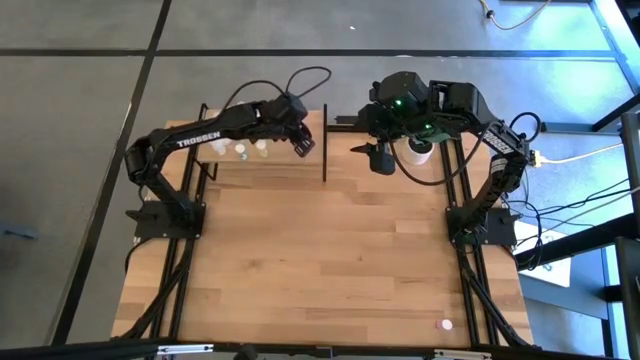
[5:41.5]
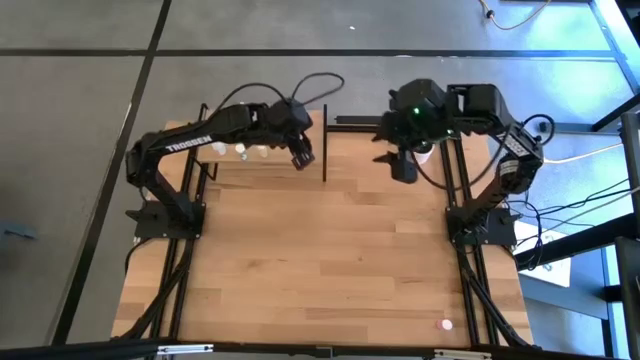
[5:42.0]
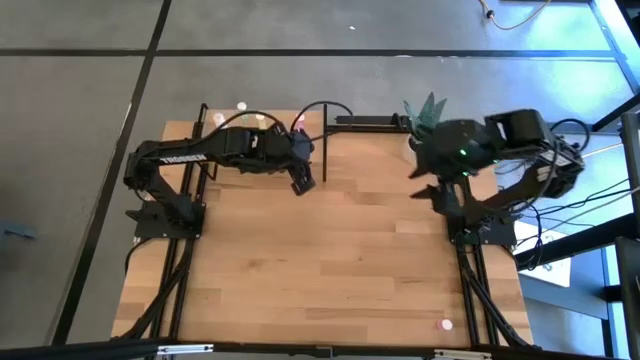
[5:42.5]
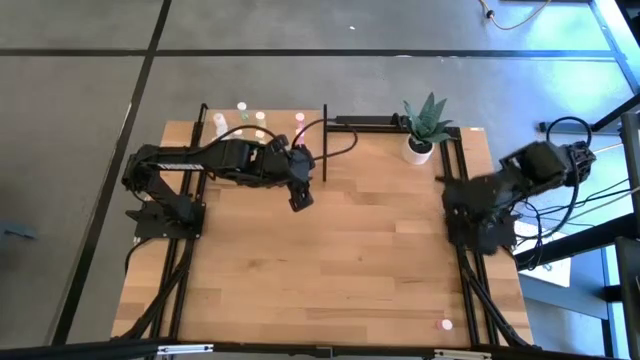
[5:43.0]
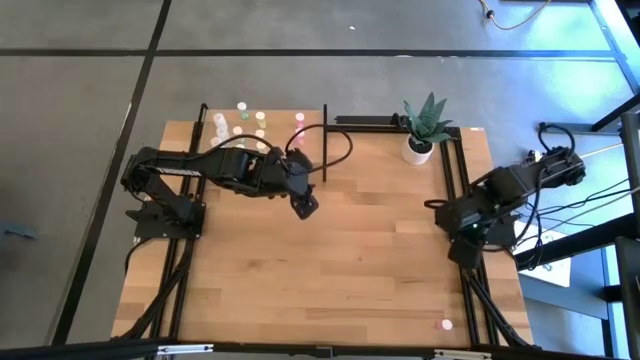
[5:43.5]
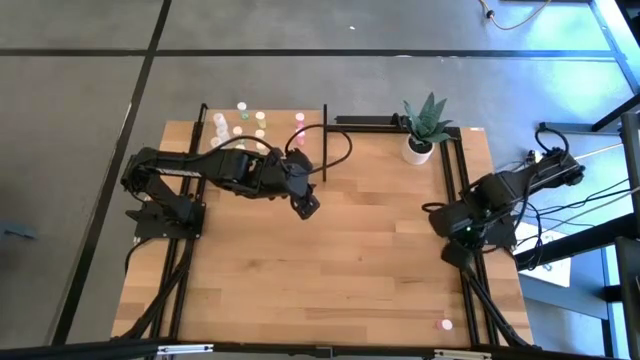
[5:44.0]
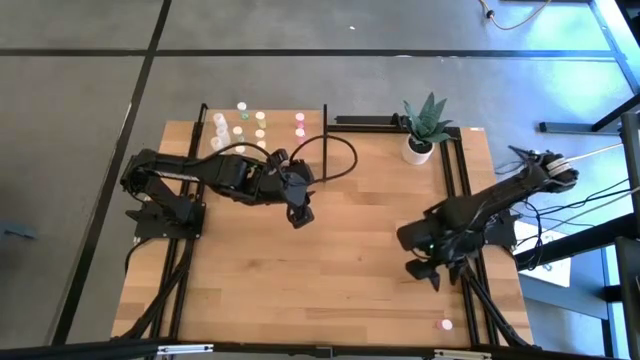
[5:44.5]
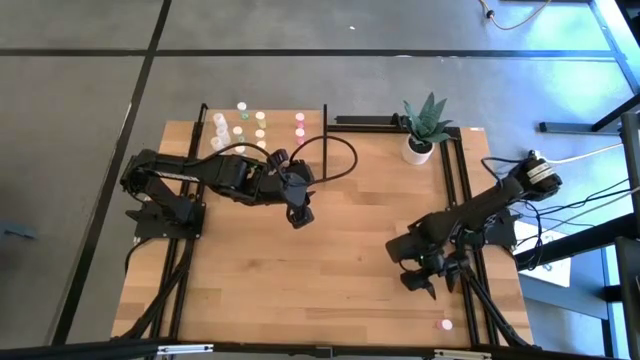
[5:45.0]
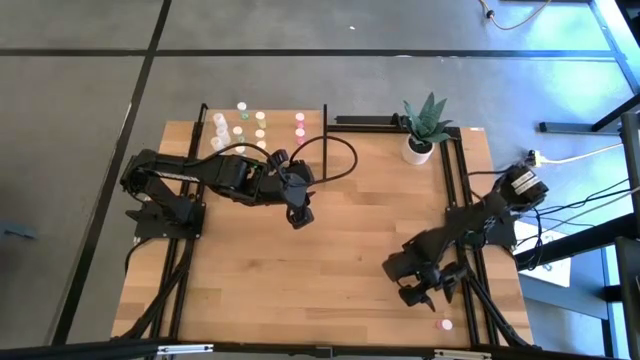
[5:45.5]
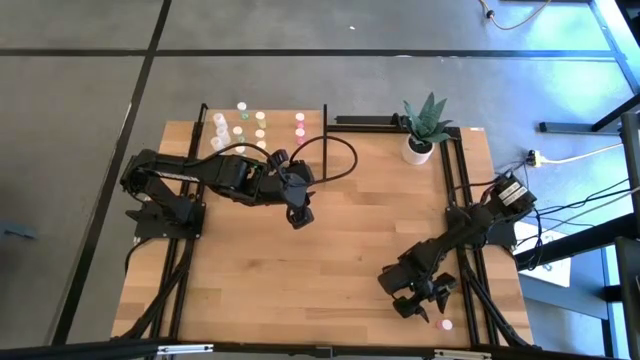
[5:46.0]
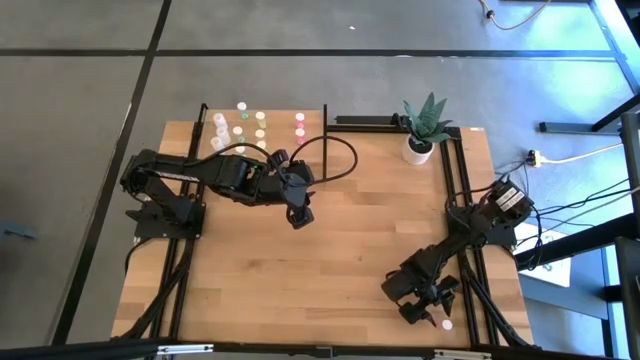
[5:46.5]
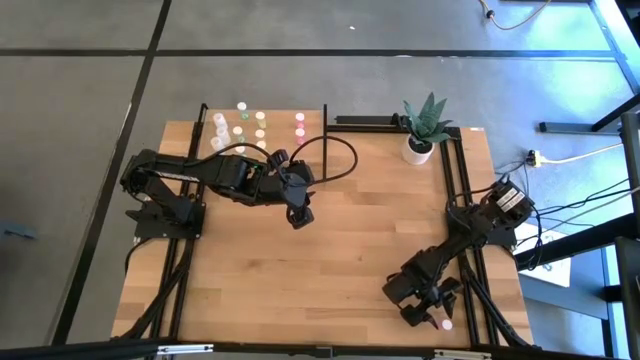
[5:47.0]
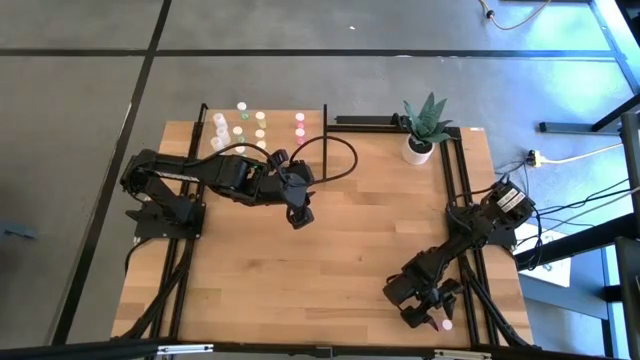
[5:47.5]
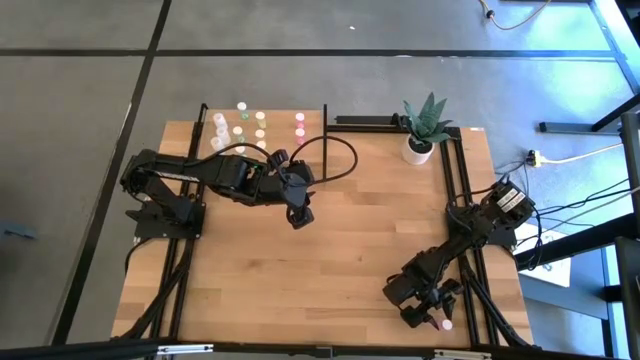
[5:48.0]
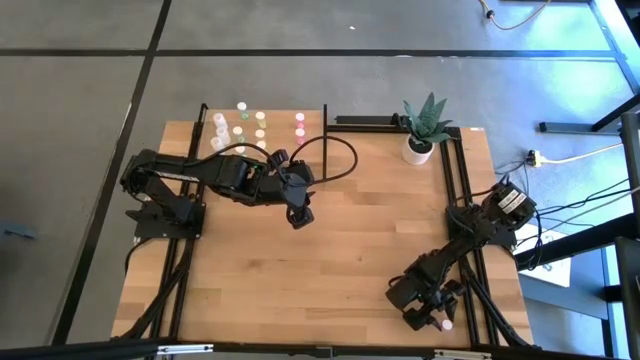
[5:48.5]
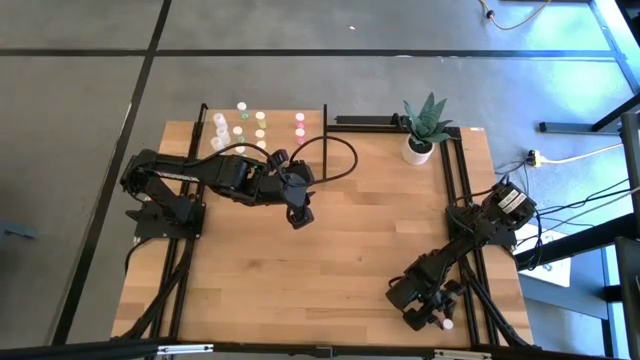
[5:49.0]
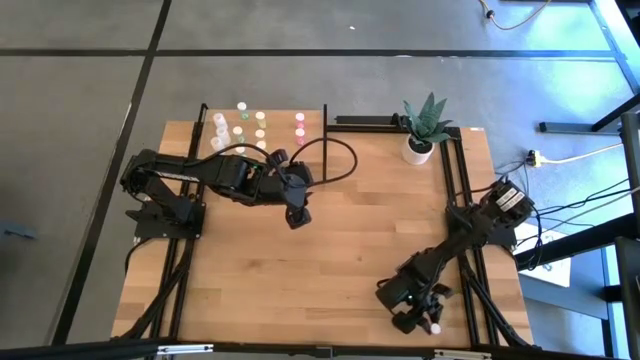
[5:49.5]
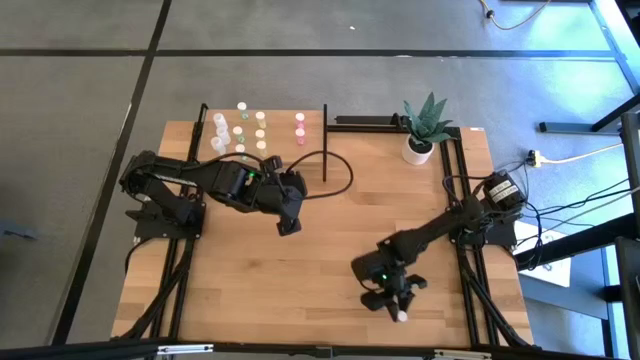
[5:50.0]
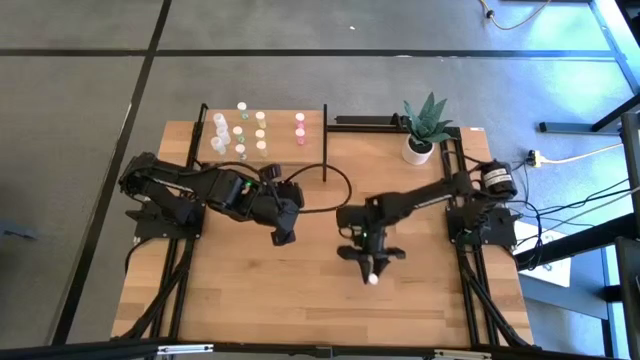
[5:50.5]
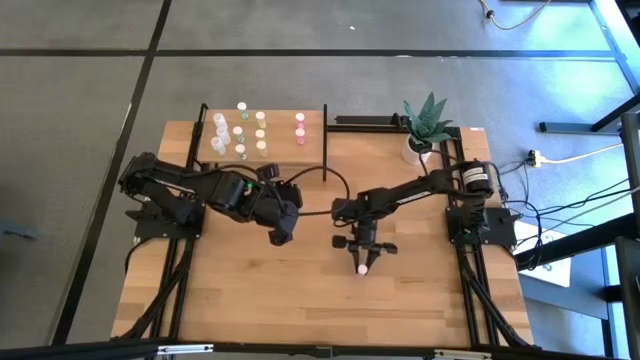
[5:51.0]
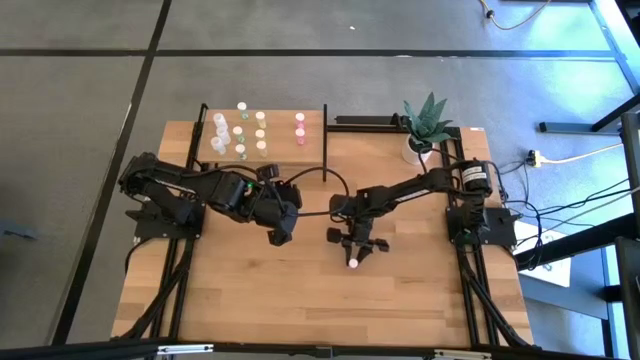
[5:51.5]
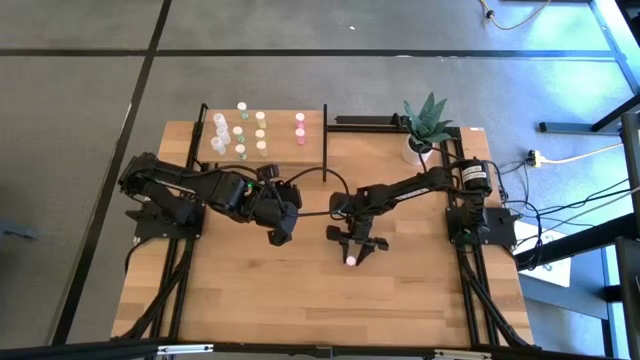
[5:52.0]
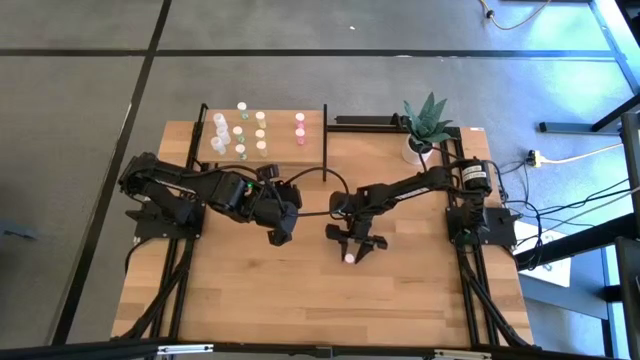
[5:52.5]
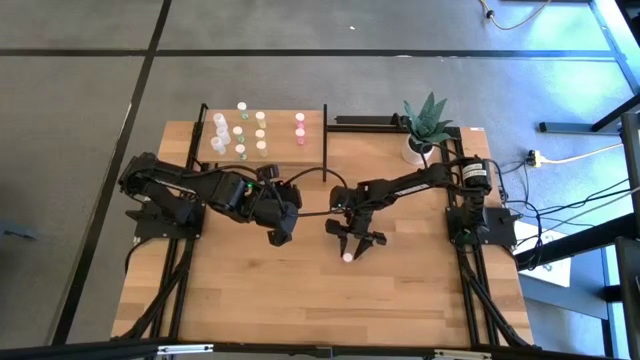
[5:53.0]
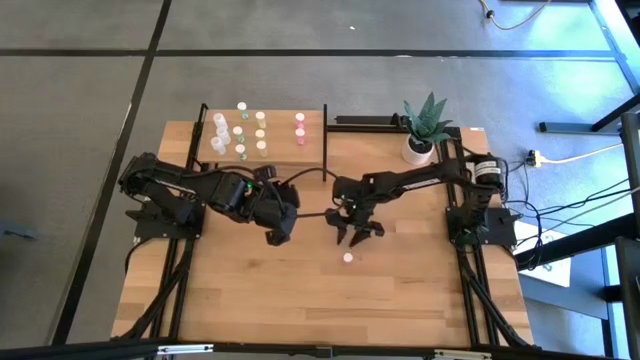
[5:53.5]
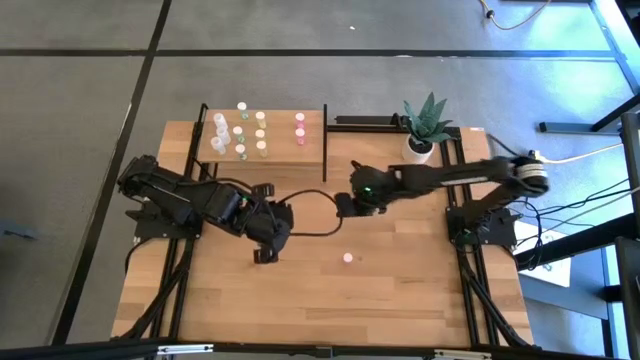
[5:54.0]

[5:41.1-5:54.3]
Task: Pick and place medicine bottles onto shelf by color
Put the pink pill bottle aligned with the other pink pill bottle on the shelf

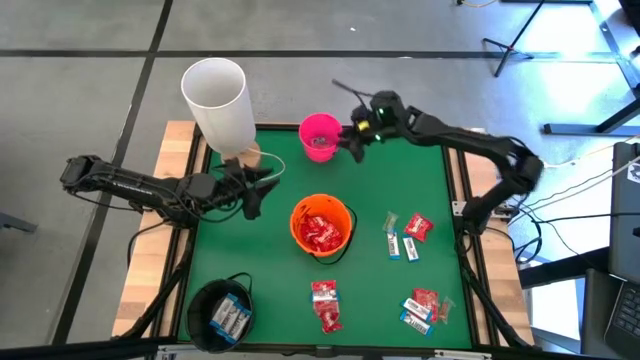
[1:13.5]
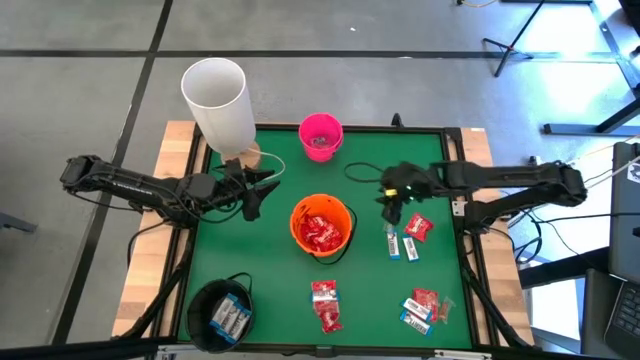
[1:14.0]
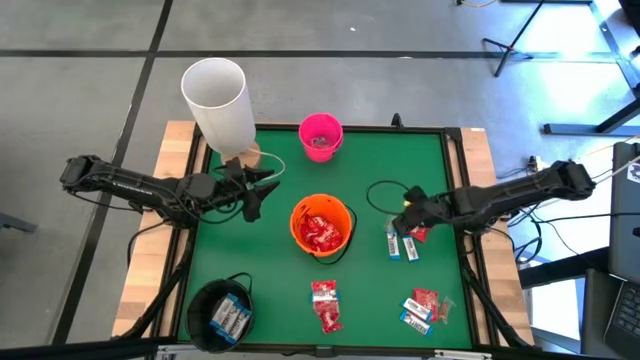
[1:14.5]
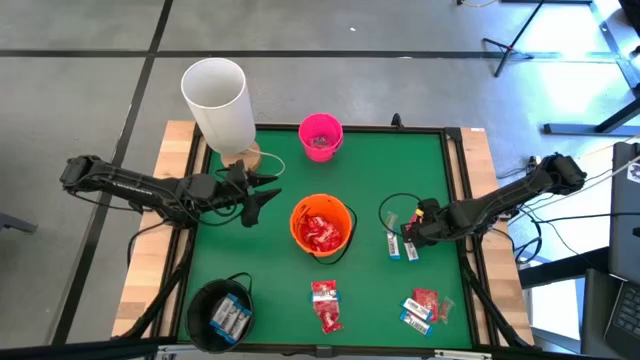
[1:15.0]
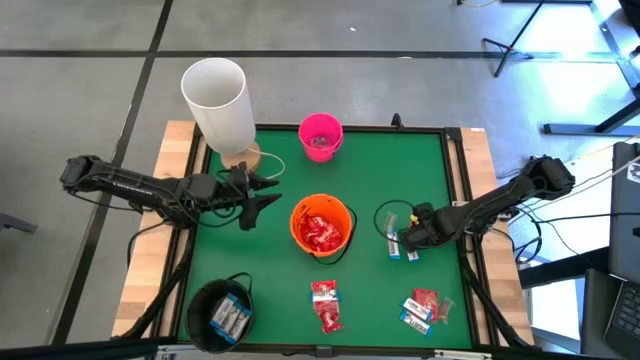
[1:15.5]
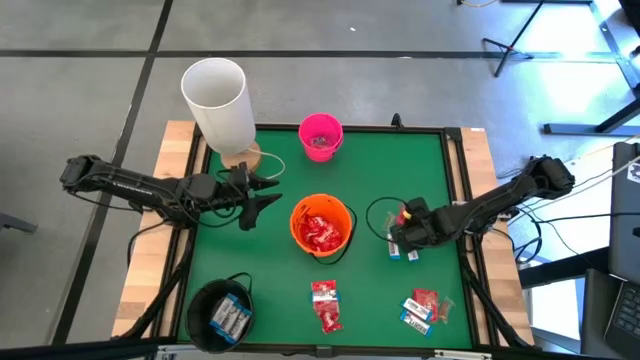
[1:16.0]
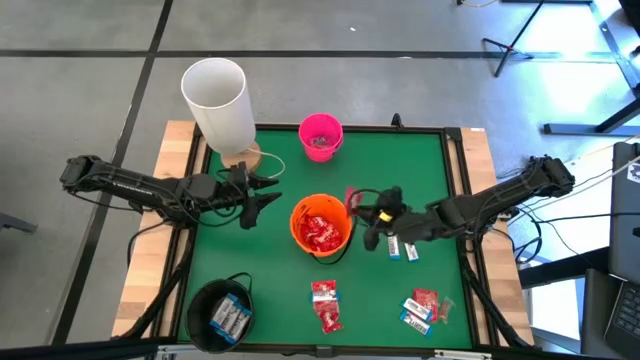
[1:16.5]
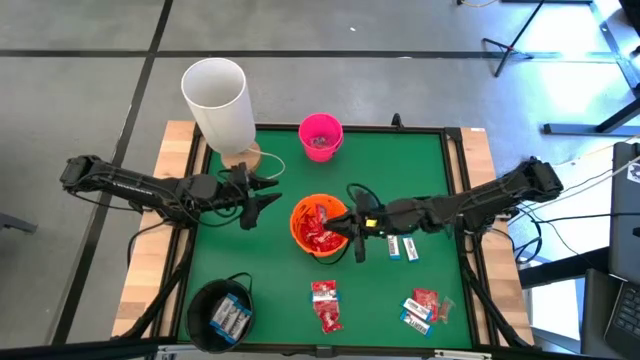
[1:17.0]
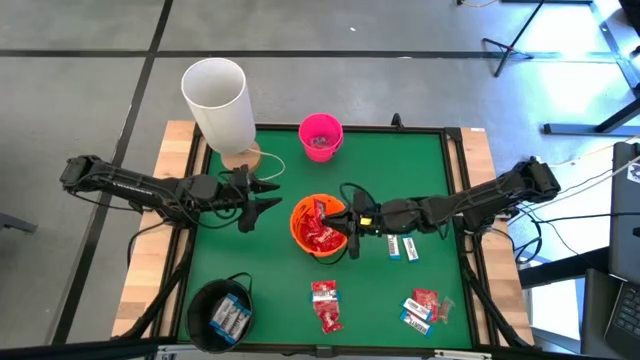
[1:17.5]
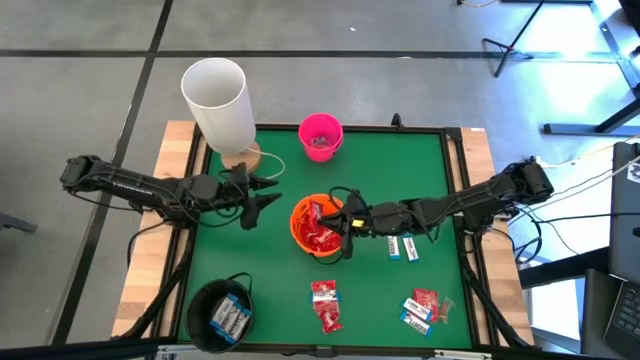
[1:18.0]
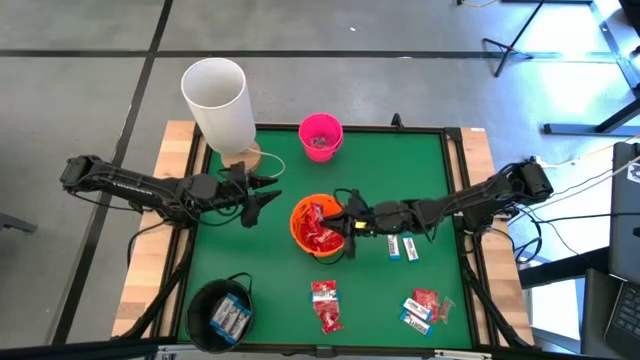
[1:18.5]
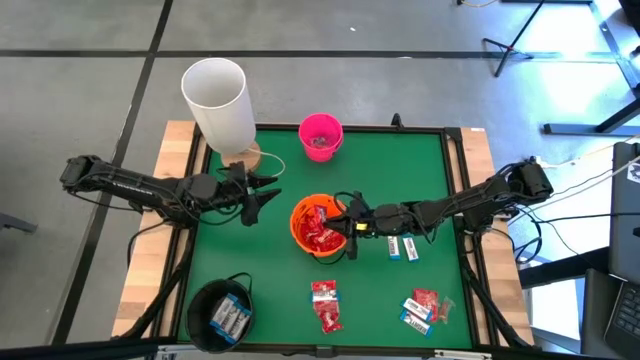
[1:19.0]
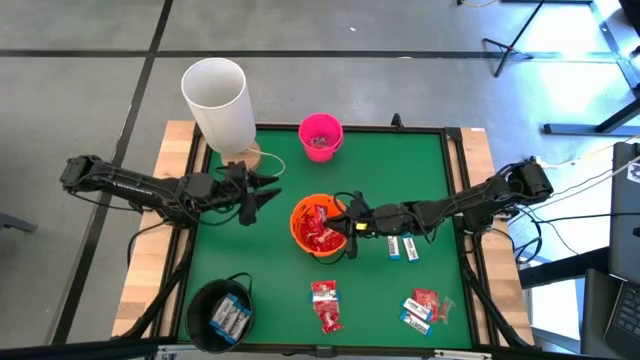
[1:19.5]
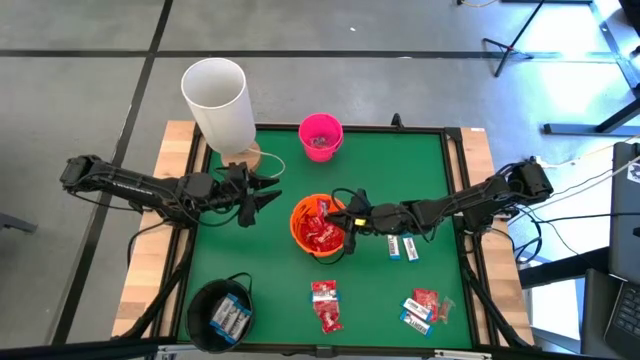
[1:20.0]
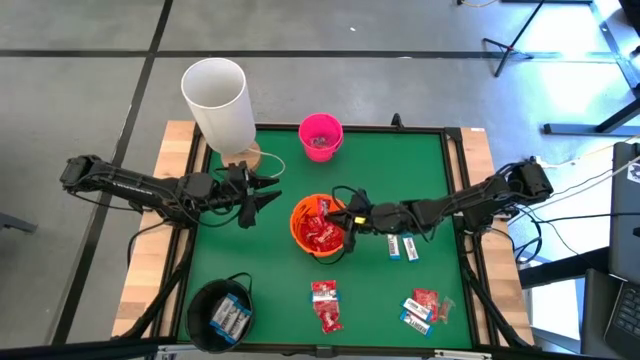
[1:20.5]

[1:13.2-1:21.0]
Task: Sort candy
Put the red candy into the orange bucket
